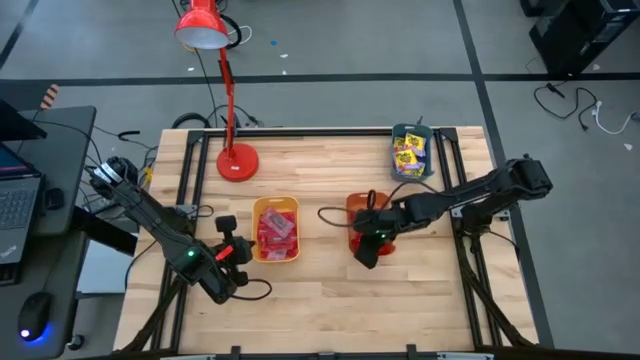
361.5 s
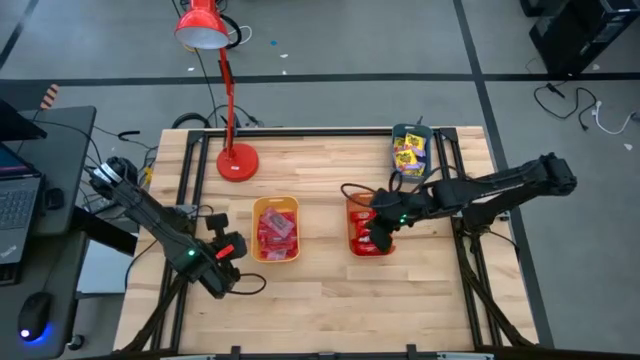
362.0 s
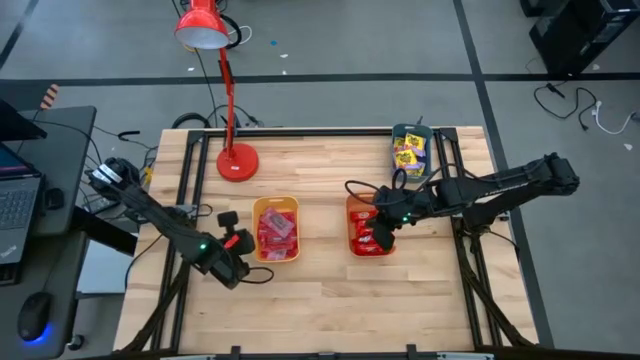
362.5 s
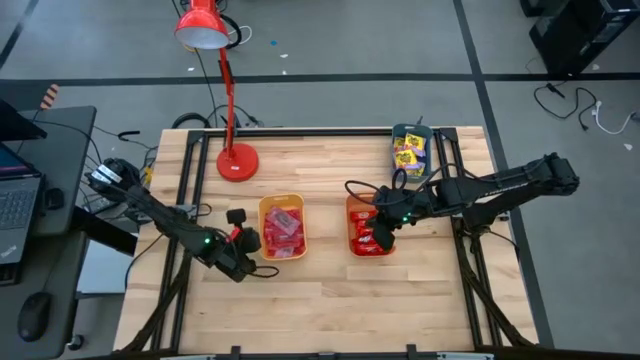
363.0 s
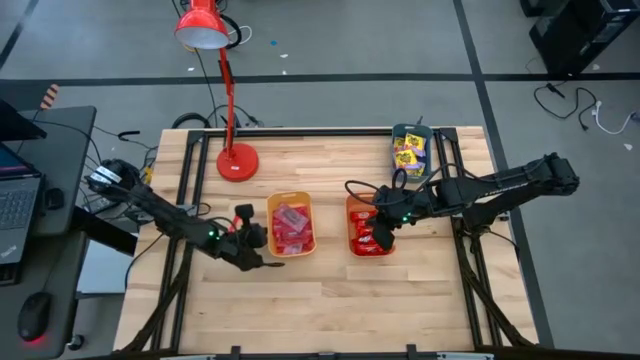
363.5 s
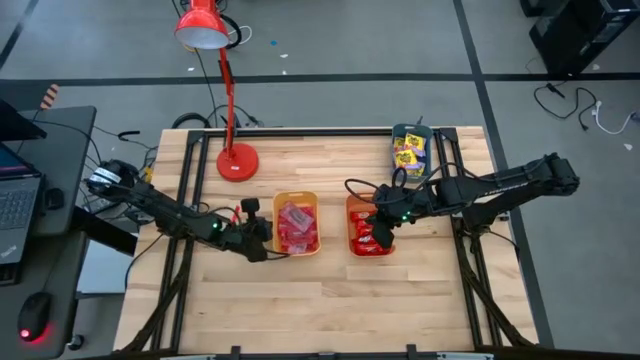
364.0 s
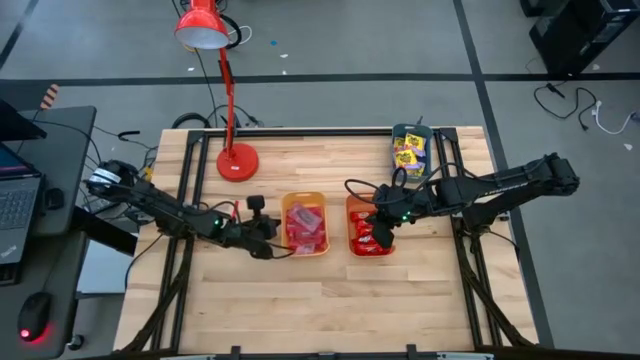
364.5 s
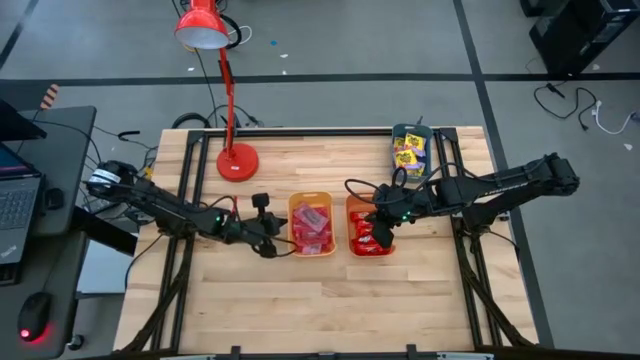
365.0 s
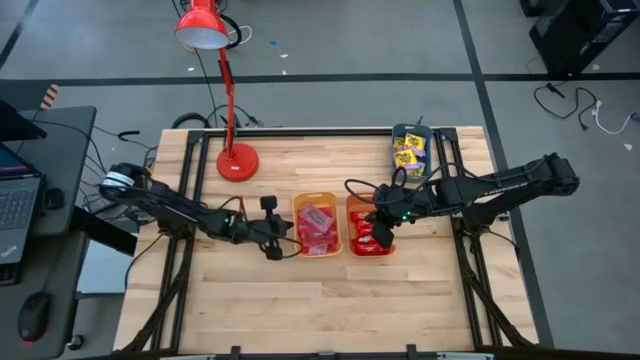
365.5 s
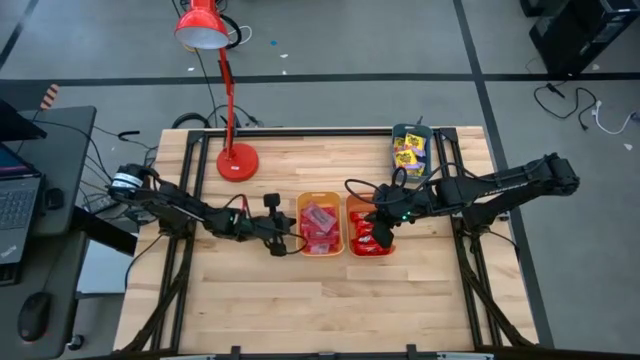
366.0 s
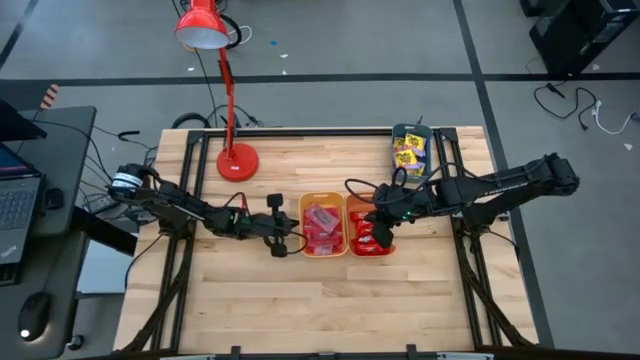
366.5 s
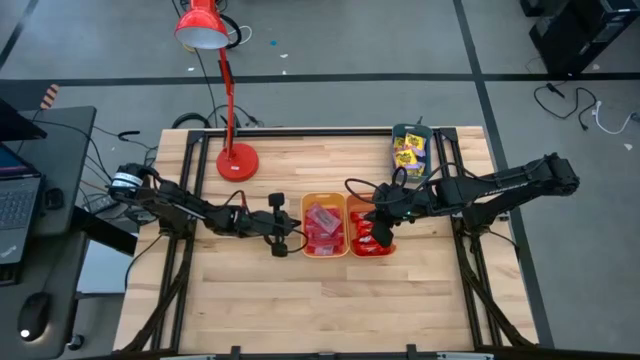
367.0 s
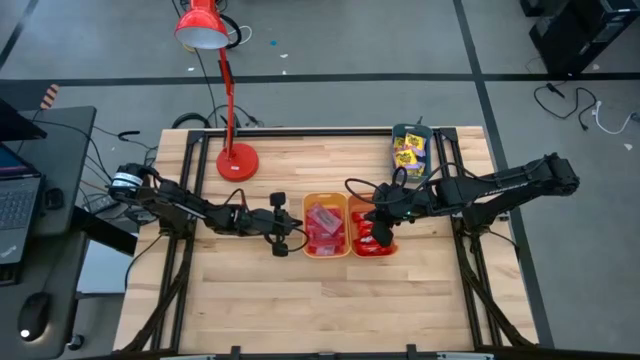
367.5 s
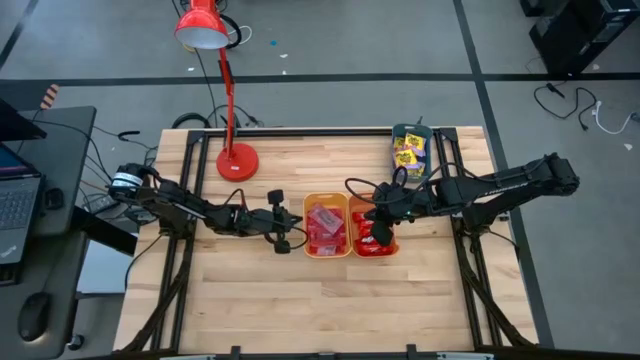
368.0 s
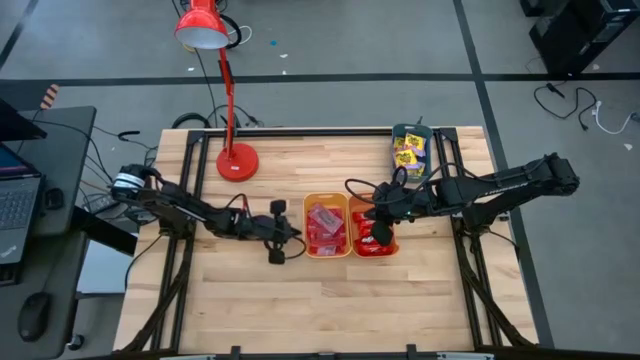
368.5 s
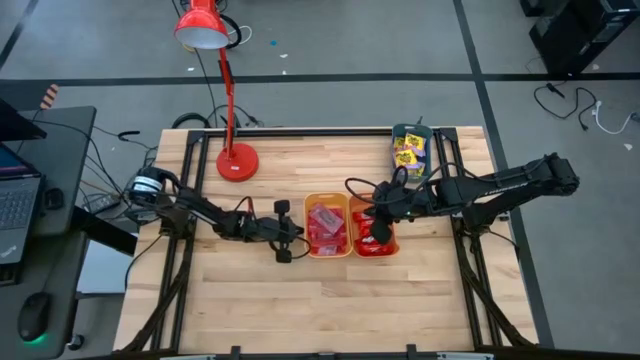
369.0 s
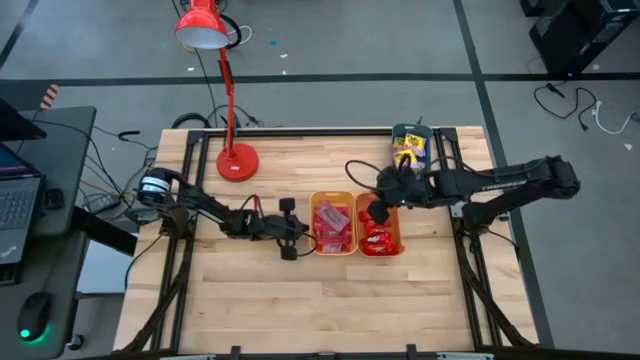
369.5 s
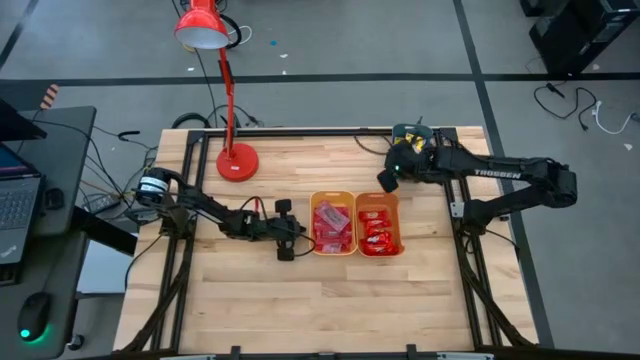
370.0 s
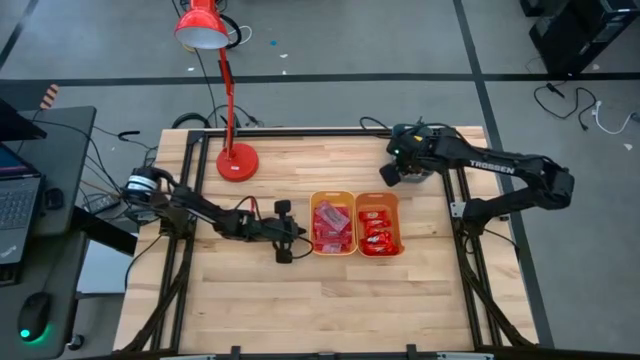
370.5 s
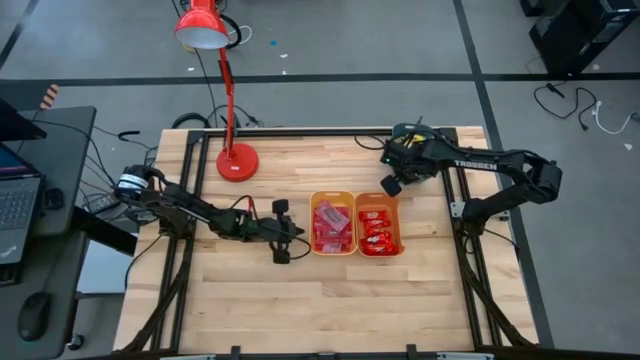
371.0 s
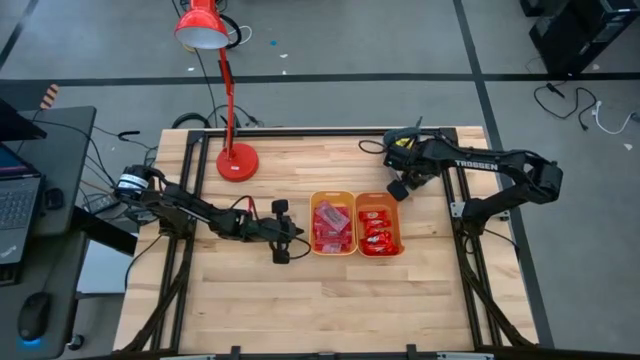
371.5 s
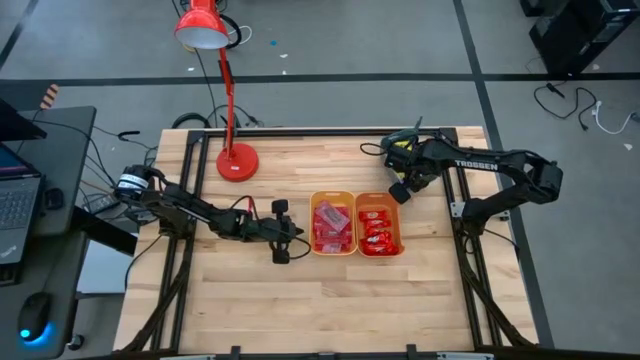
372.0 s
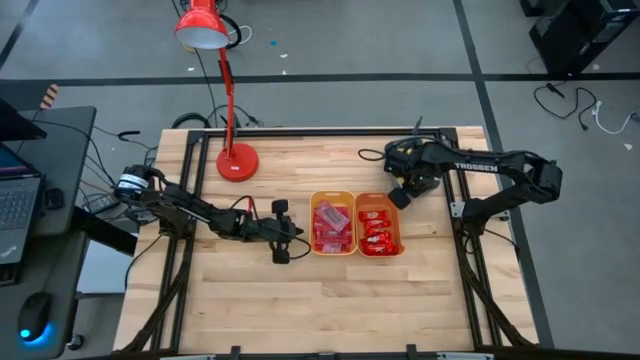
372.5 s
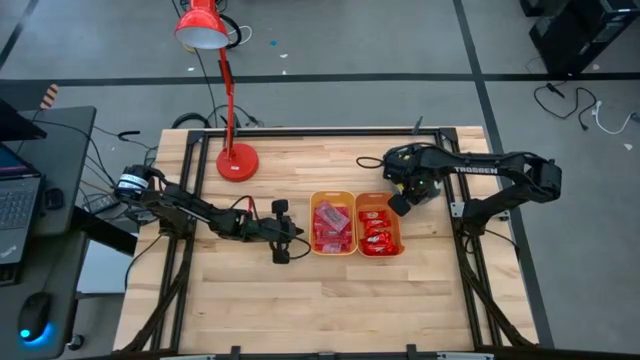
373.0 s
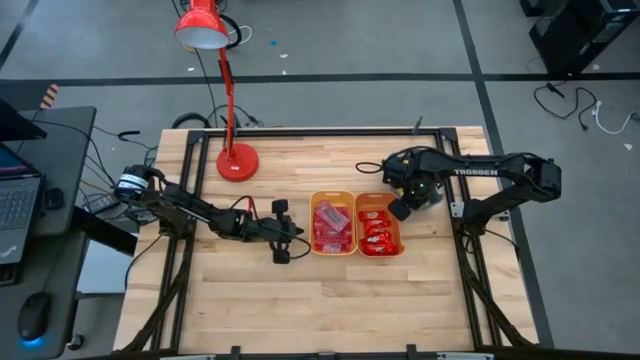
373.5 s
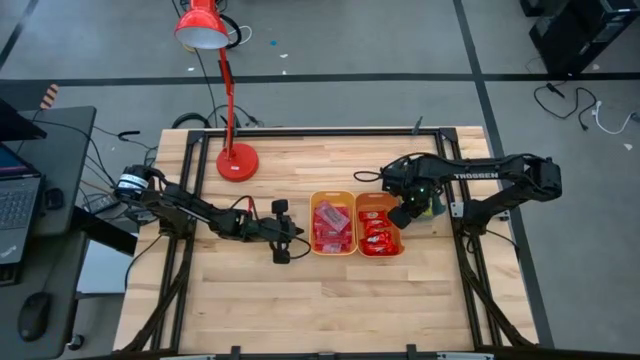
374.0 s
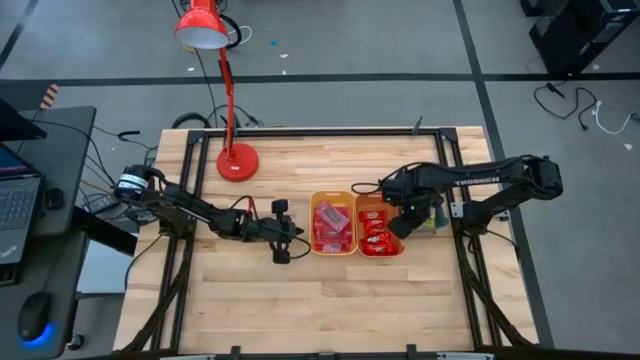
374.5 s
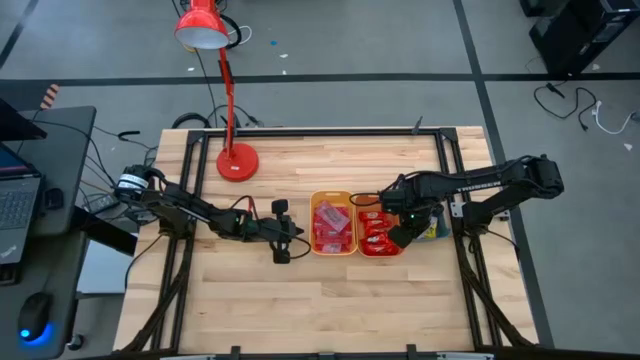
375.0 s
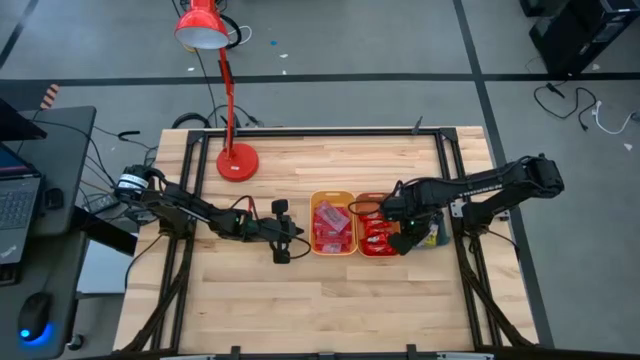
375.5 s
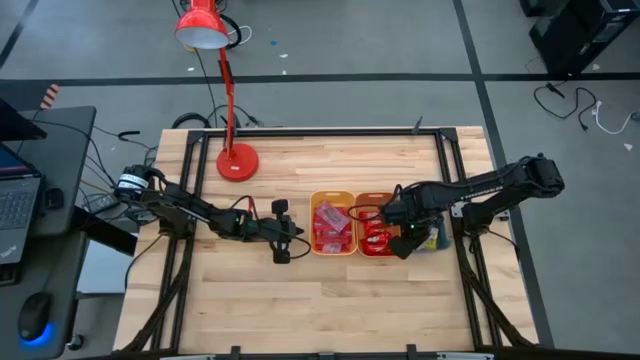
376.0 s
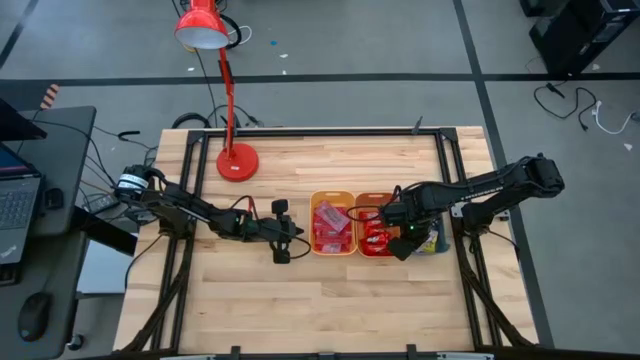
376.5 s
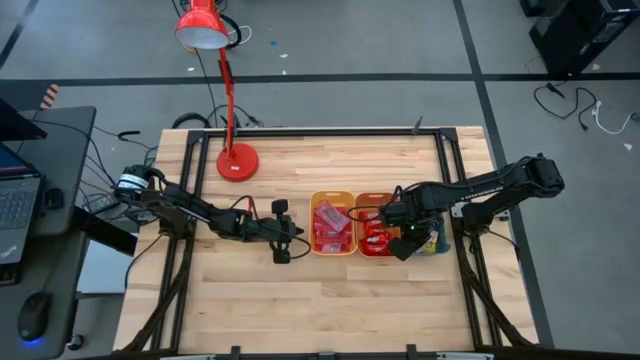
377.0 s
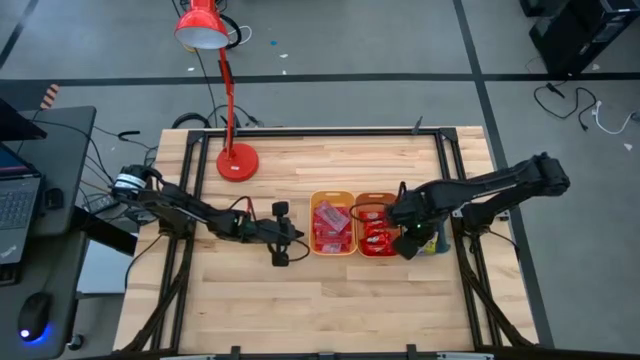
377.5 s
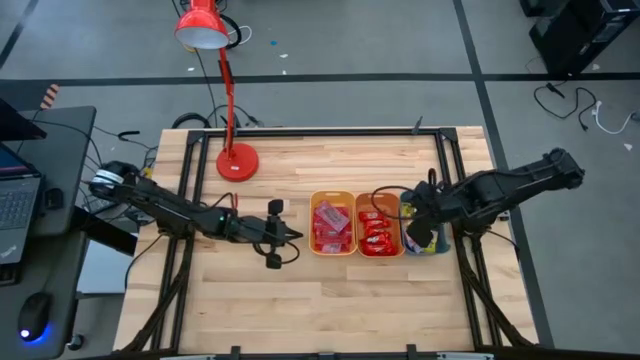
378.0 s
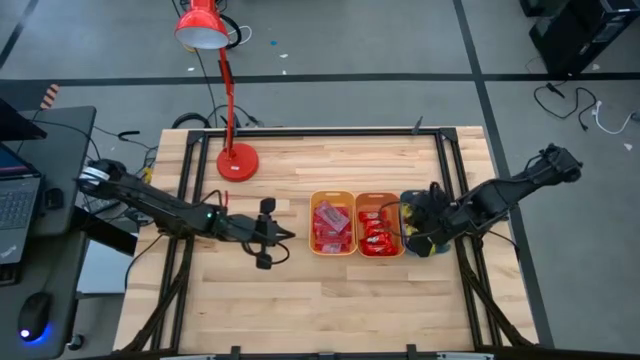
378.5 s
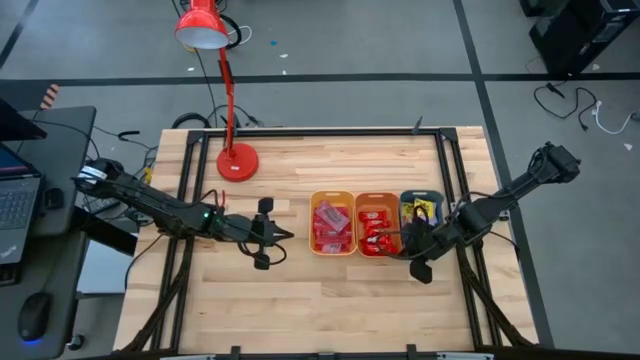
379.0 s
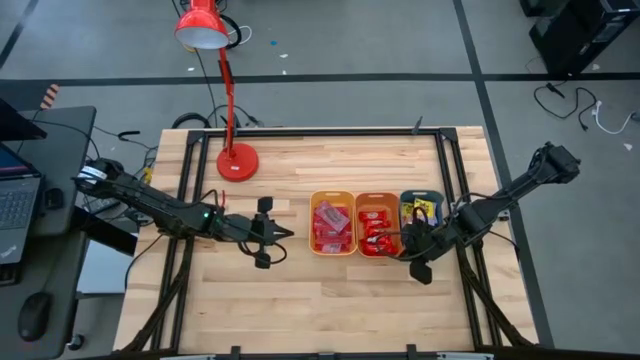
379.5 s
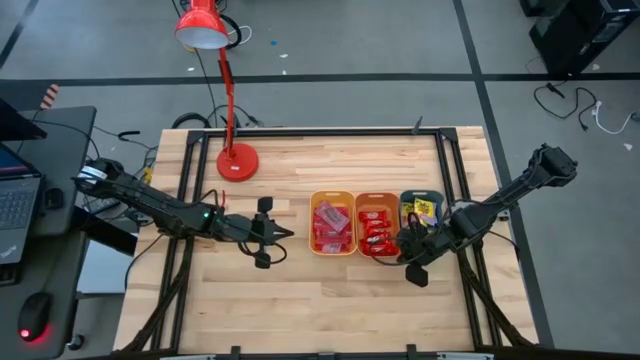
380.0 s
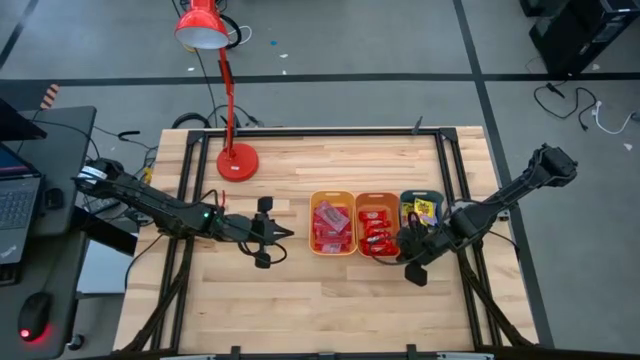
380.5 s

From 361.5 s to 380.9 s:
Task: Sort candy
Move the bins to the center of the table

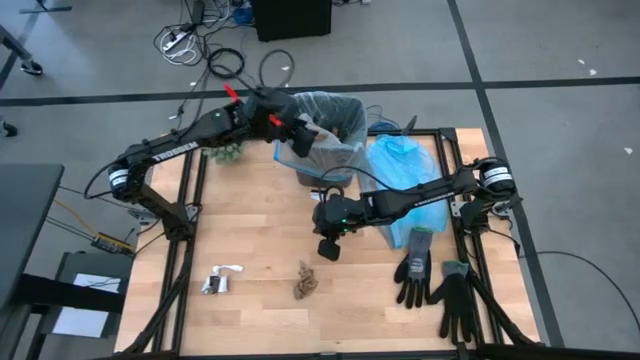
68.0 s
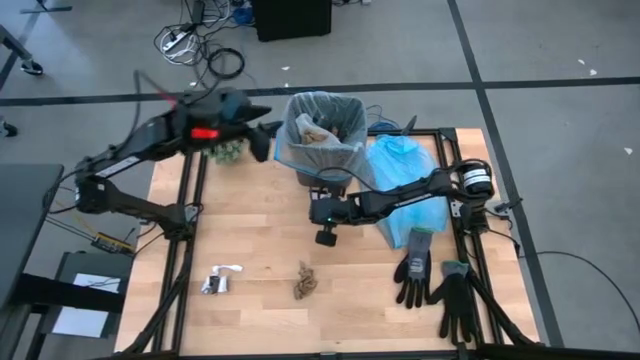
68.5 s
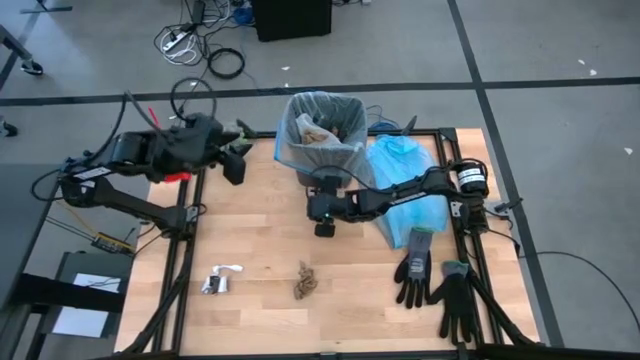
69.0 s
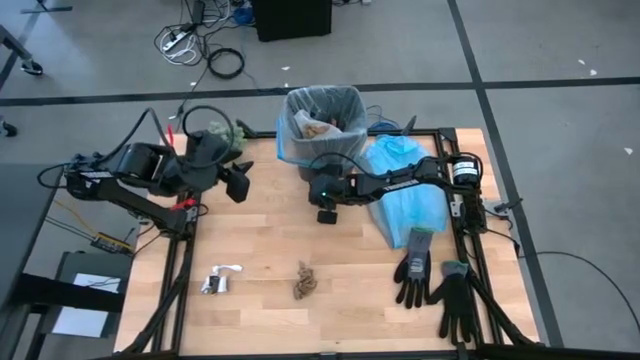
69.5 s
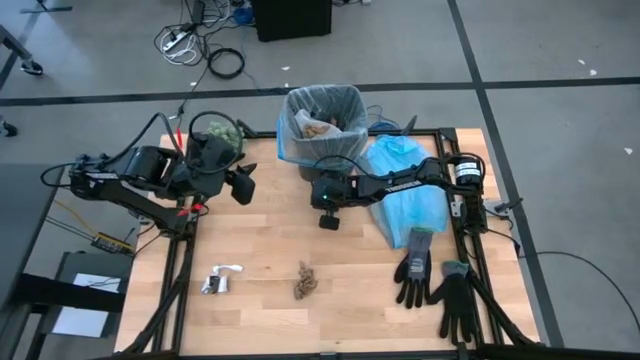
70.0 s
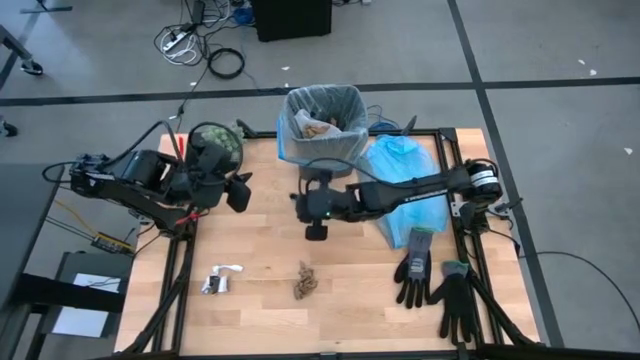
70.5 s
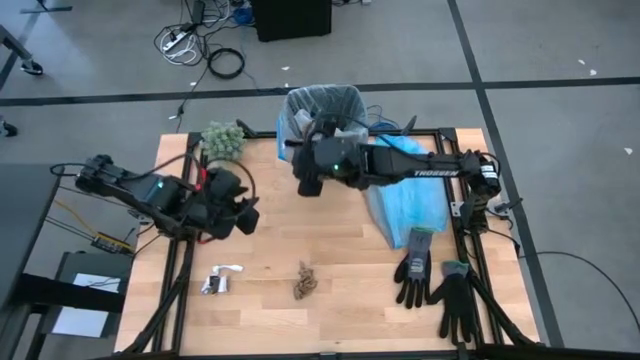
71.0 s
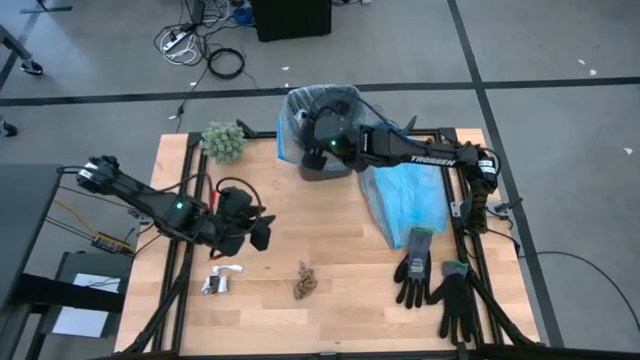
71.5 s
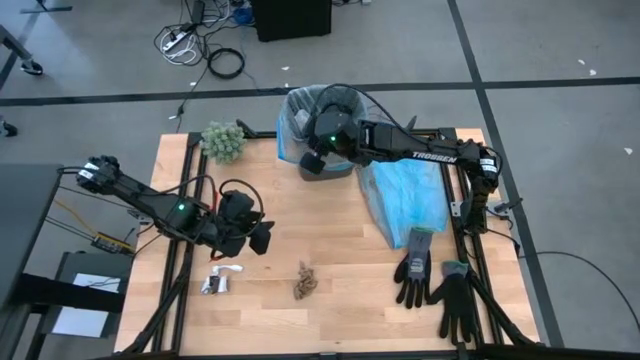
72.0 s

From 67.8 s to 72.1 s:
Task: place trash/remove bag and relplace
Put the white paper into the trash bin
